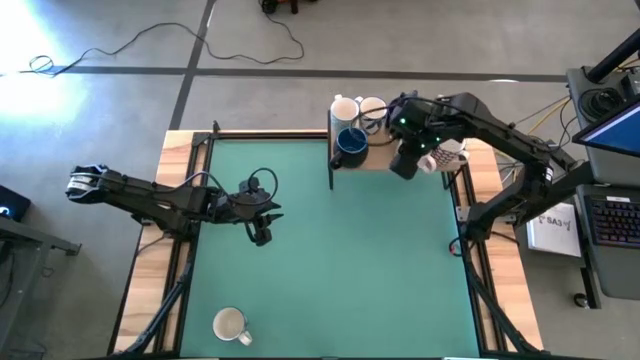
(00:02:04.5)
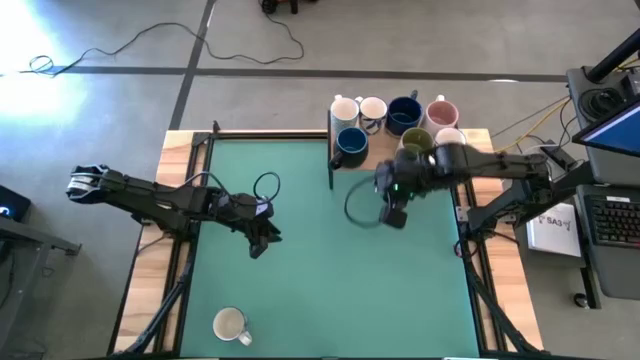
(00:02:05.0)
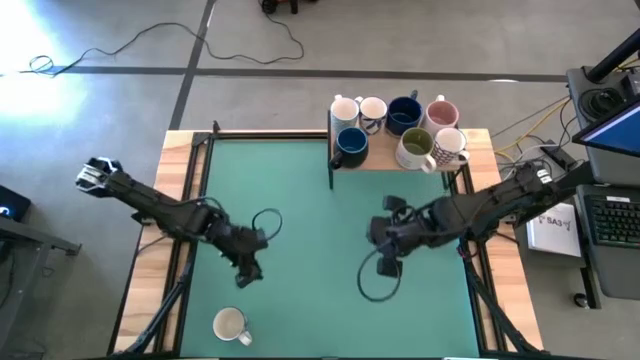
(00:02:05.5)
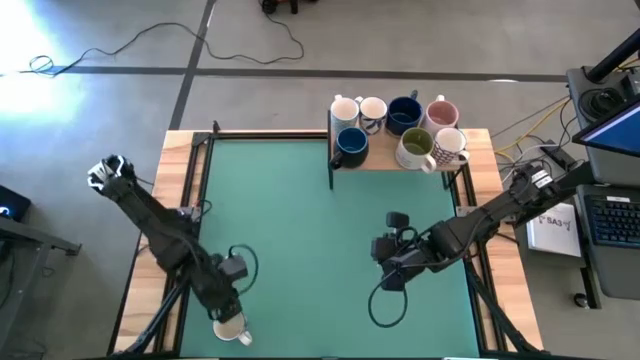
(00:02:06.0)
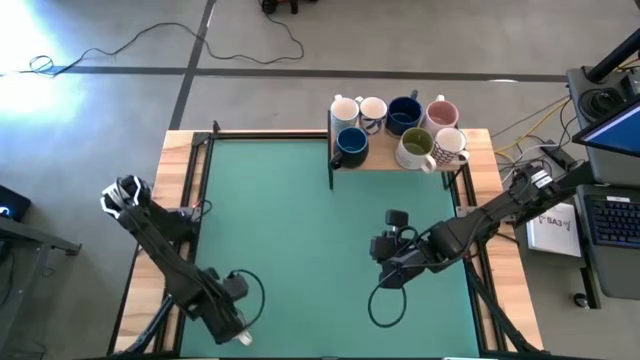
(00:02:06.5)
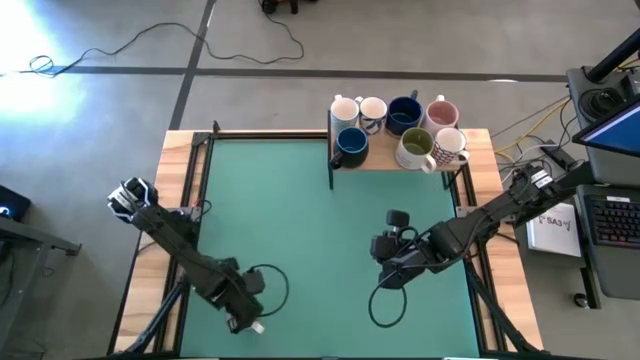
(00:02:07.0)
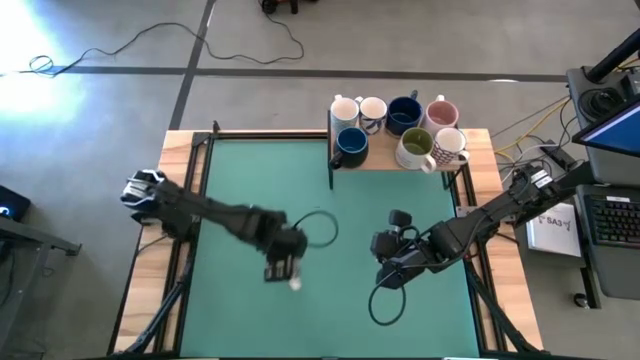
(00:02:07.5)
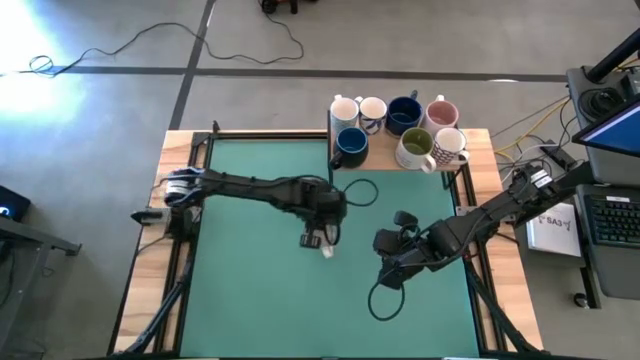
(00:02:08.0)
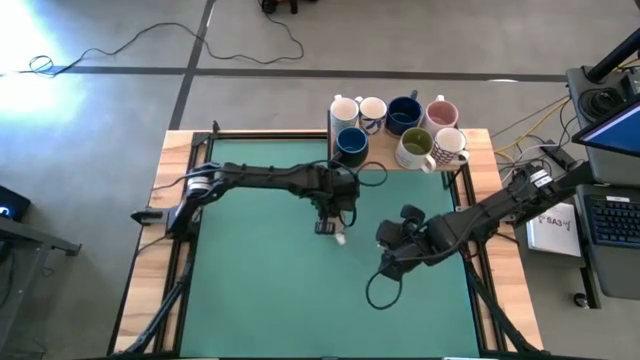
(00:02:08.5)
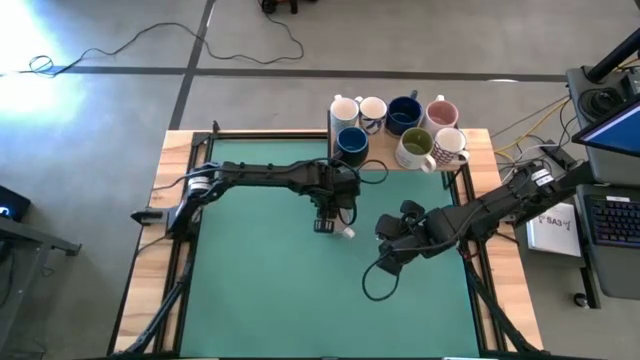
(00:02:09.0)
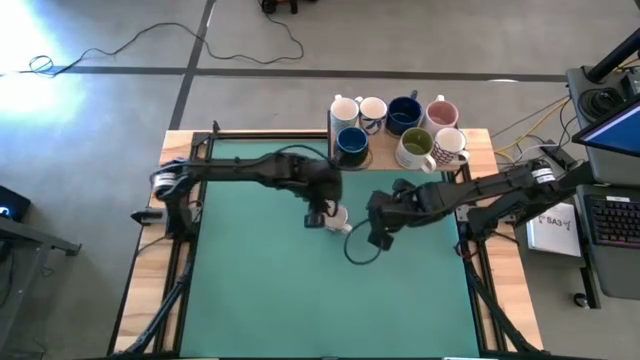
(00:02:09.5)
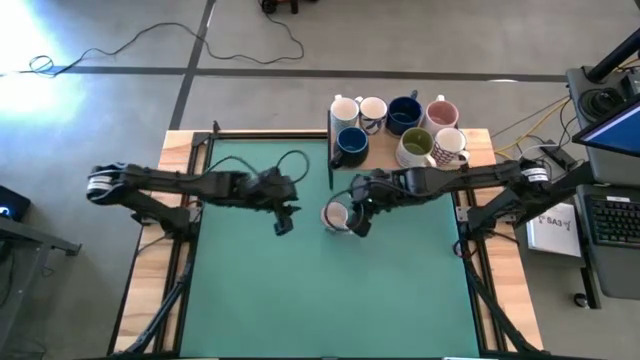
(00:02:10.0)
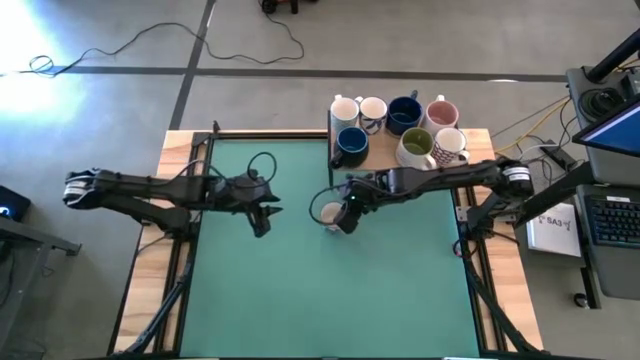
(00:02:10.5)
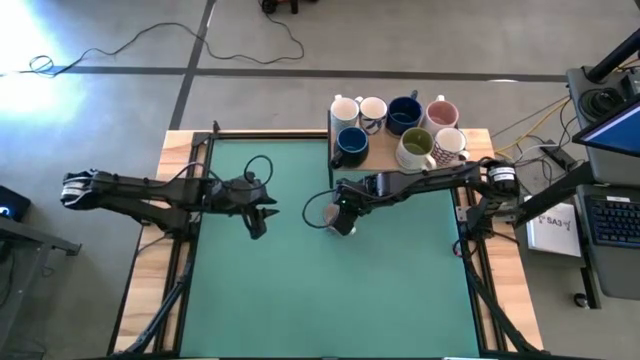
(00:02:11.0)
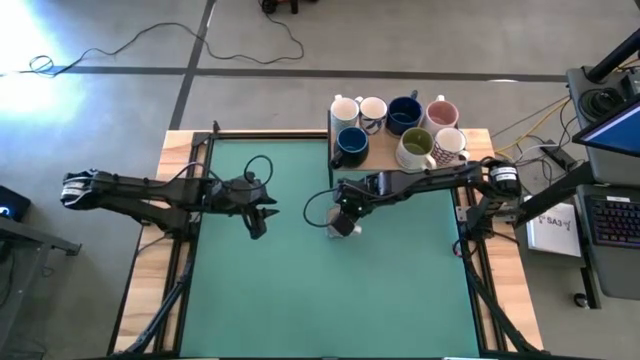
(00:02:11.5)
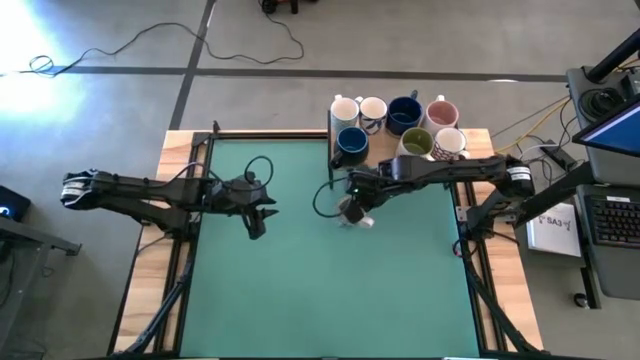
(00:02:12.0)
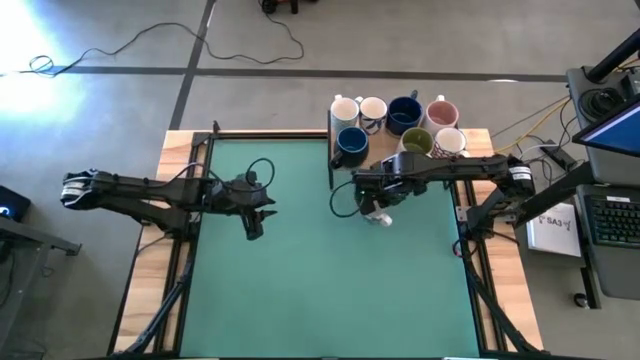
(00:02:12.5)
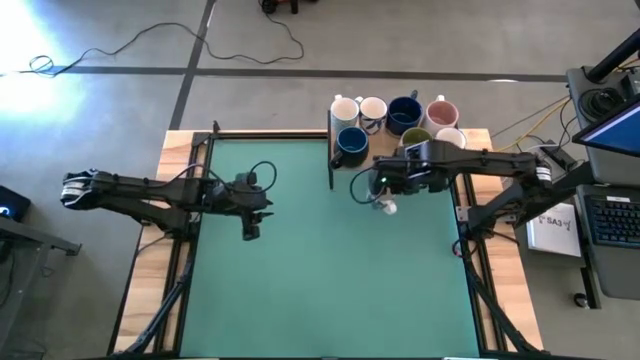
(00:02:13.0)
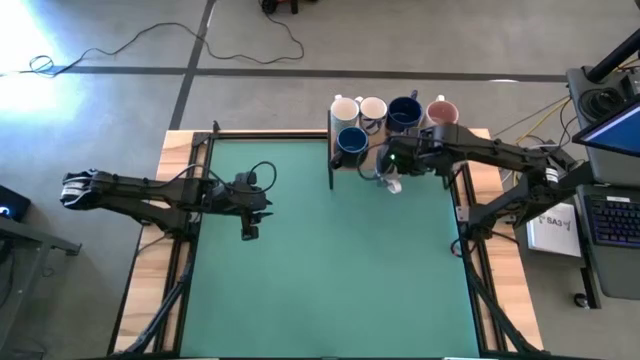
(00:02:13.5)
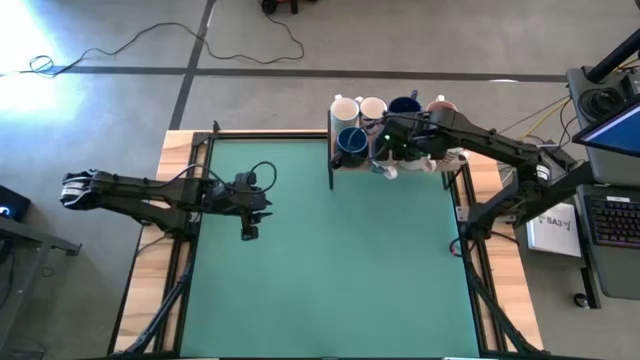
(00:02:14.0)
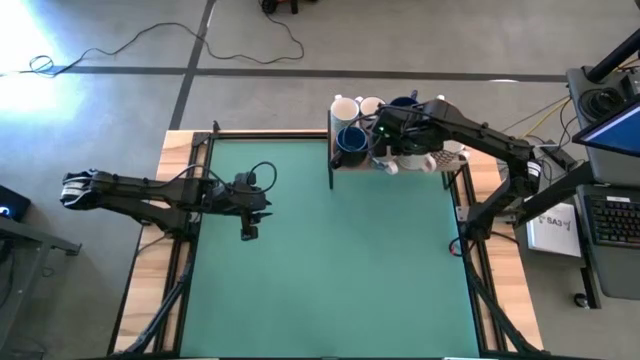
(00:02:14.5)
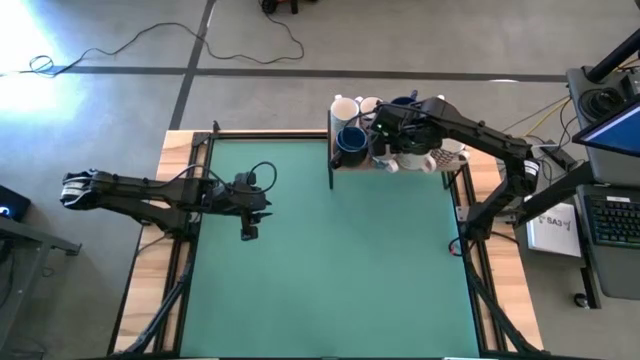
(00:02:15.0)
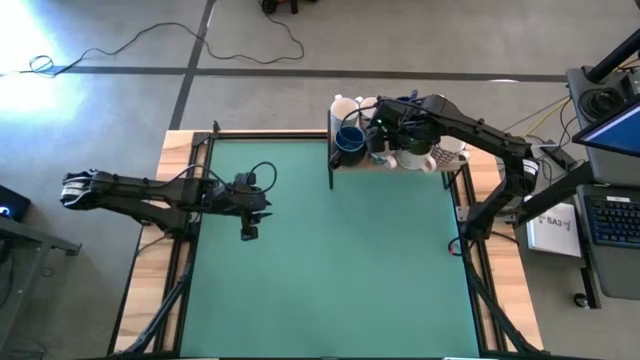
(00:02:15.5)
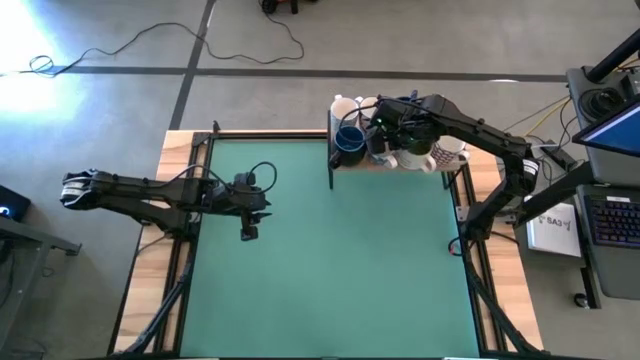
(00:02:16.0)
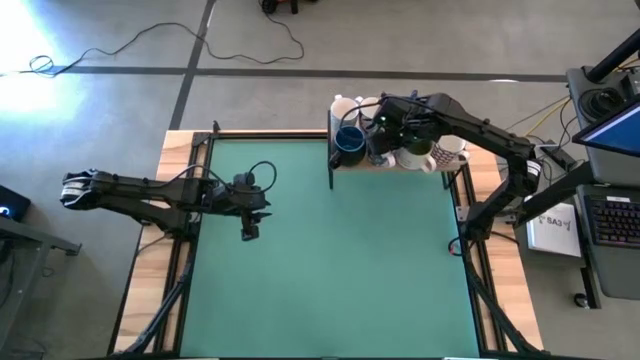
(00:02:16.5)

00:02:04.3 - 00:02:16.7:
Task: Place coffee mugs
Put the blue patterned mug on the shelf

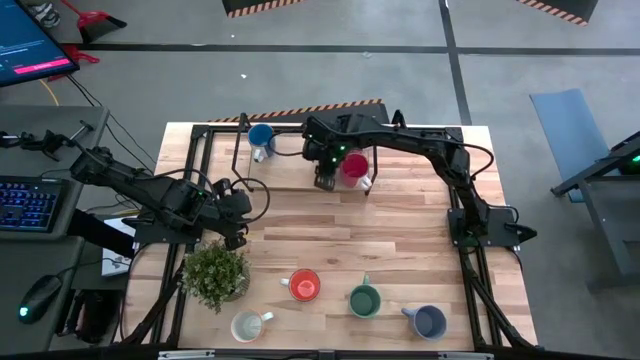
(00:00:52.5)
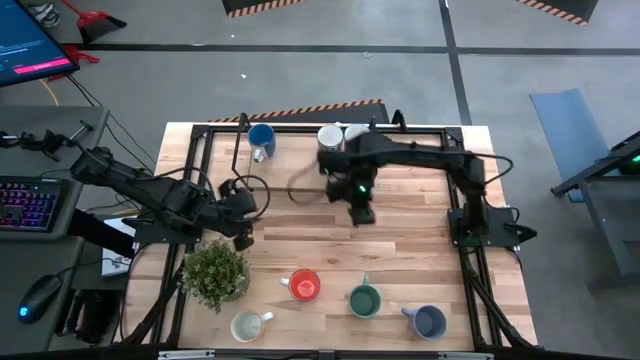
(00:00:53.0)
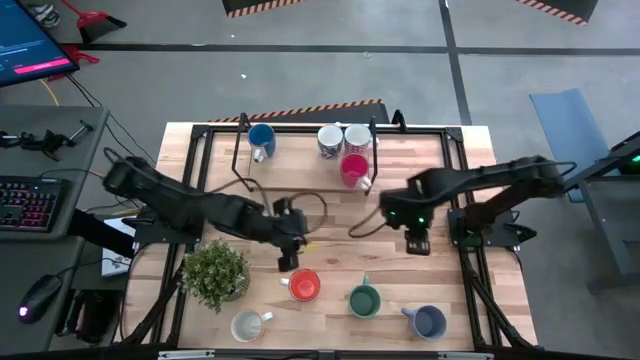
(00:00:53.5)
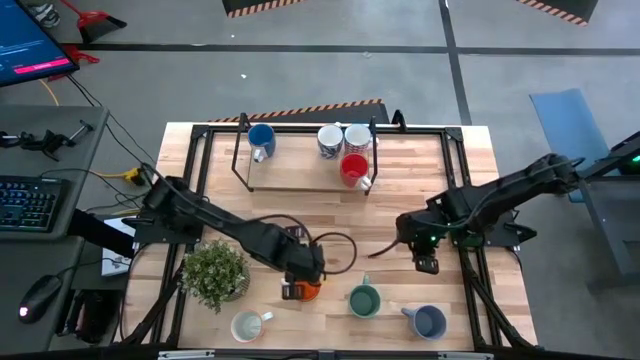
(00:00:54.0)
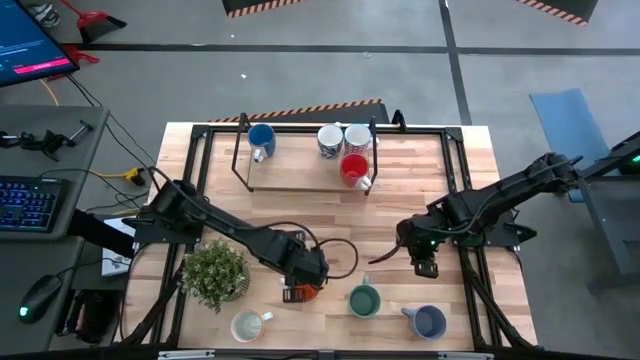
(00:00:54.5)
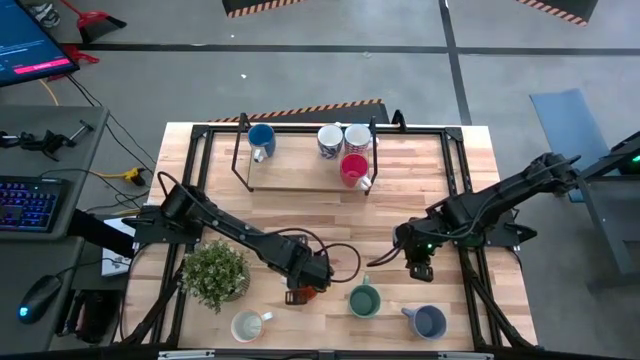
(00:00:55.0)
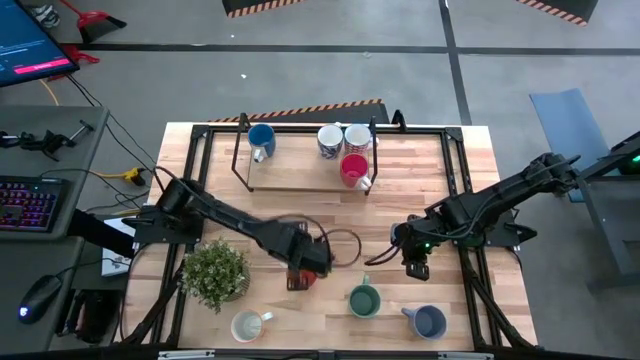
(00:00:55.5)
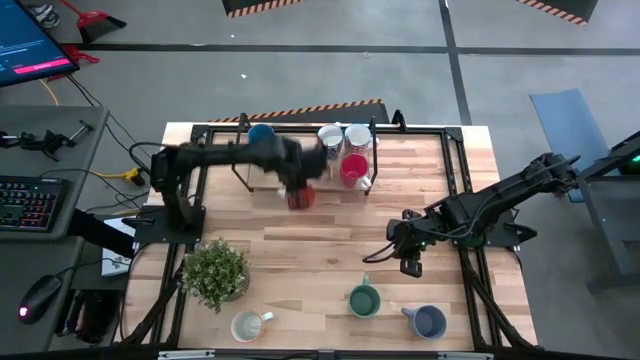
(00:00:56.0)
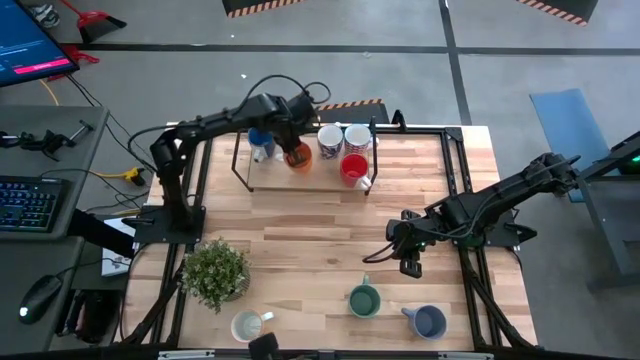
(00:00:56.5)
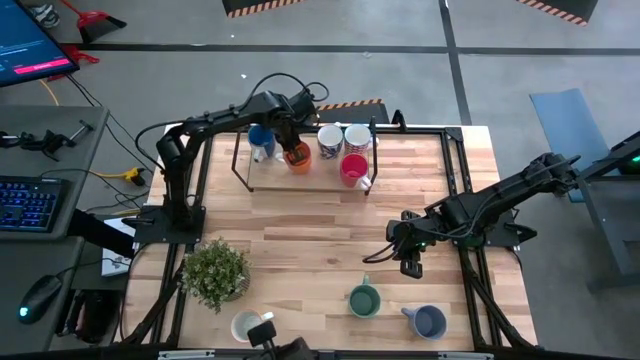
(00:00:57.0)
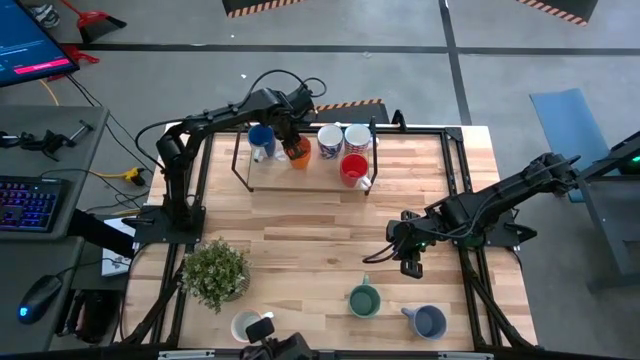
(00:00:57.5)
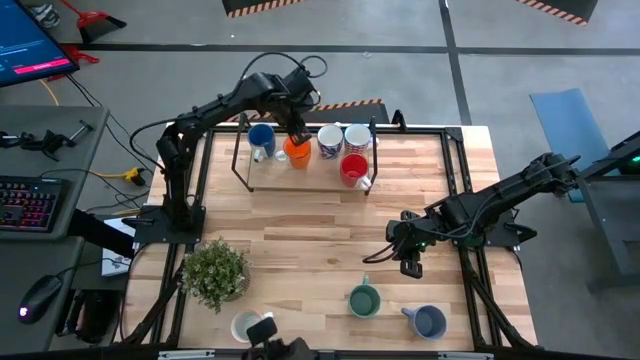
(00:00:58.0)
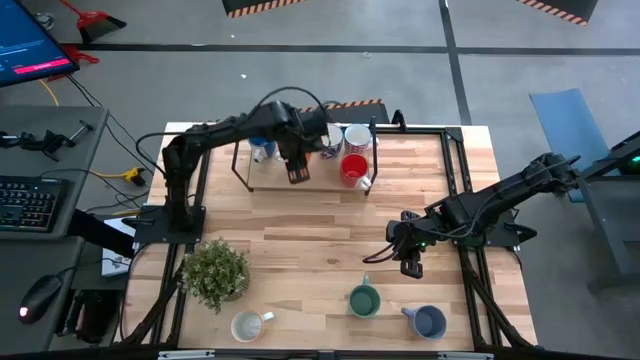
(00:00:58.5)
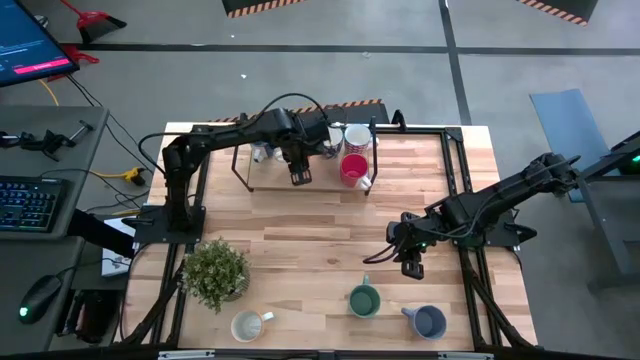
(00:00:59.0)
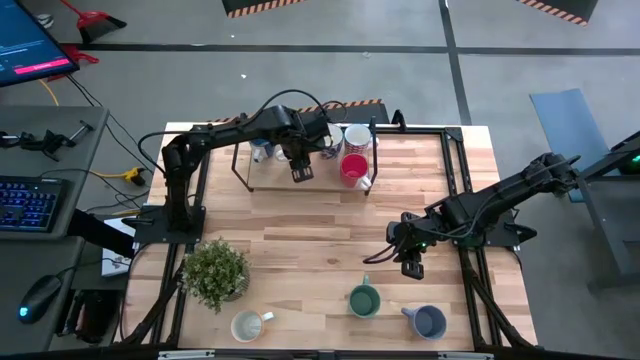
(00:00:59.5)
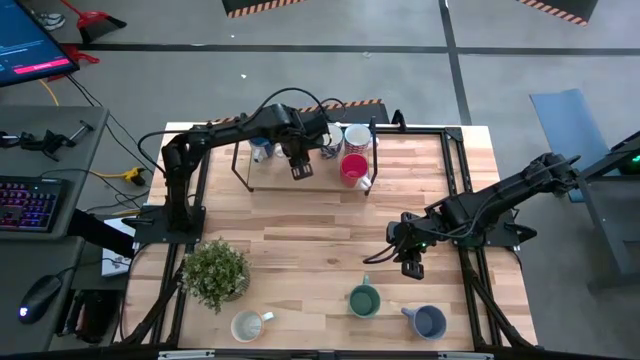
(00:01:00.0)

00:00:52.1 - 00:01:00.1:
Task: Place coffee mugs
Put the orange mug on the shelf
